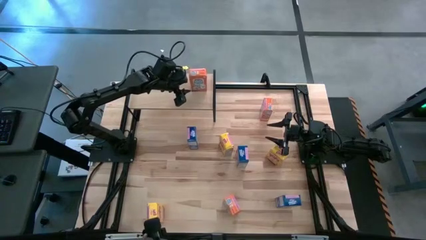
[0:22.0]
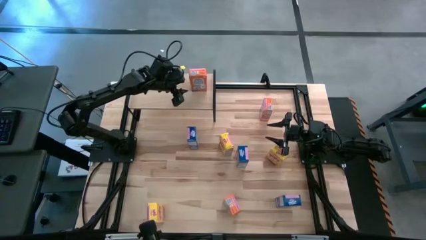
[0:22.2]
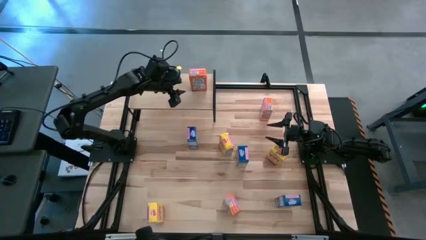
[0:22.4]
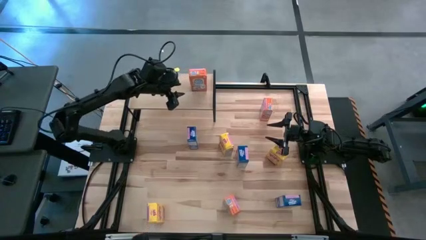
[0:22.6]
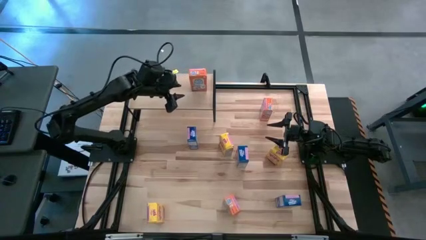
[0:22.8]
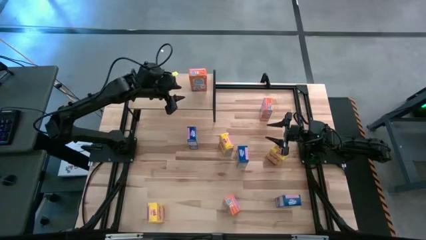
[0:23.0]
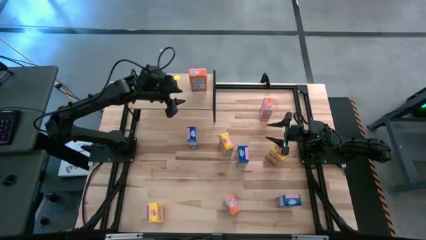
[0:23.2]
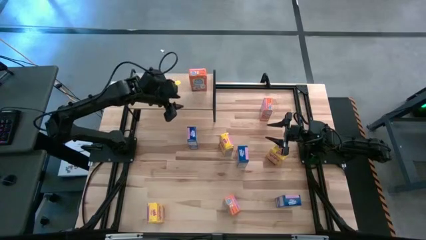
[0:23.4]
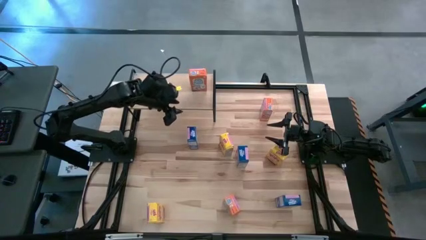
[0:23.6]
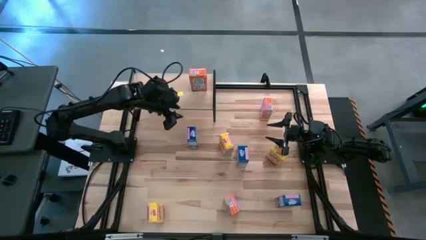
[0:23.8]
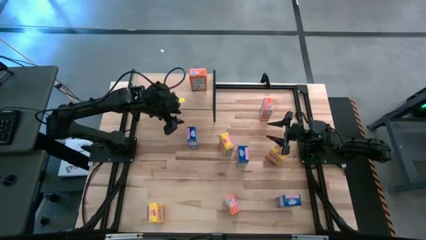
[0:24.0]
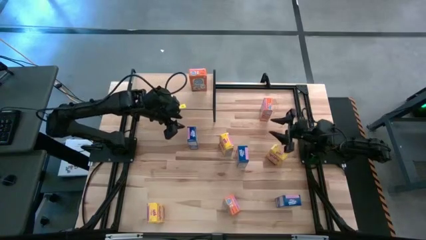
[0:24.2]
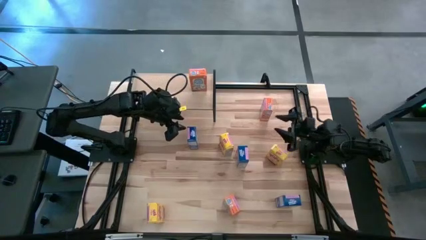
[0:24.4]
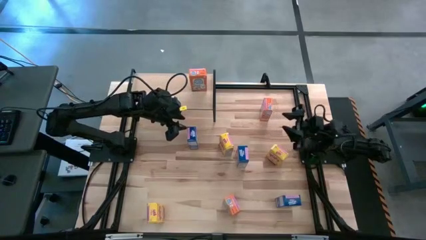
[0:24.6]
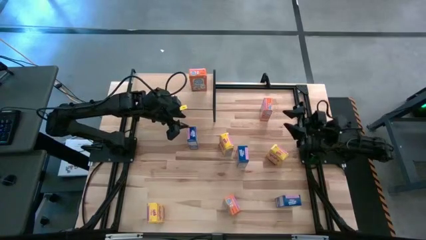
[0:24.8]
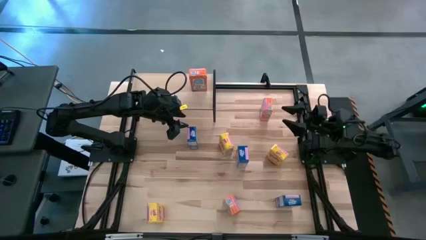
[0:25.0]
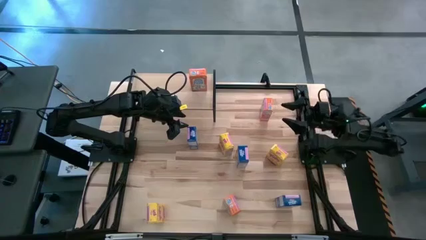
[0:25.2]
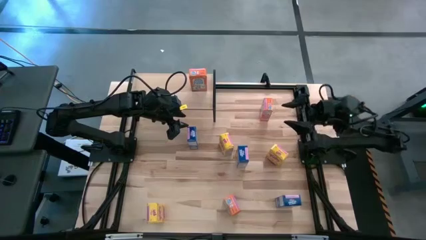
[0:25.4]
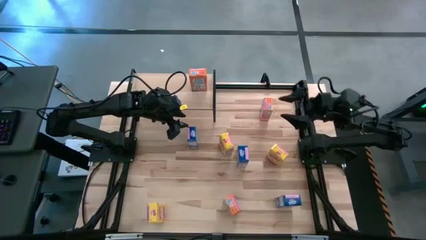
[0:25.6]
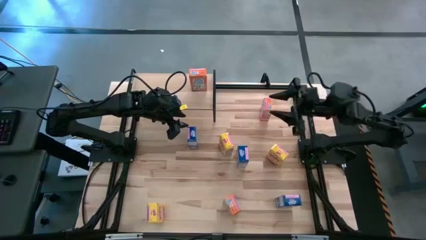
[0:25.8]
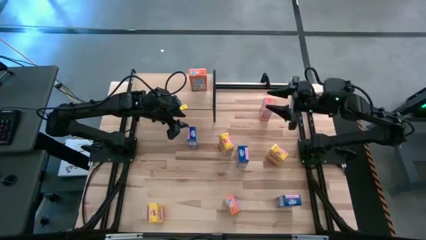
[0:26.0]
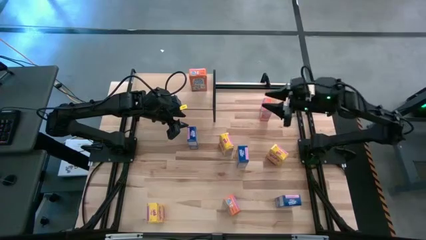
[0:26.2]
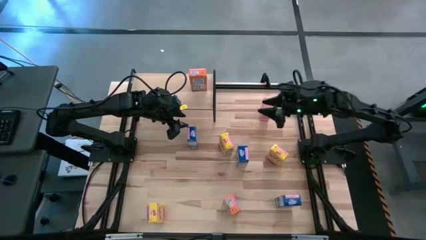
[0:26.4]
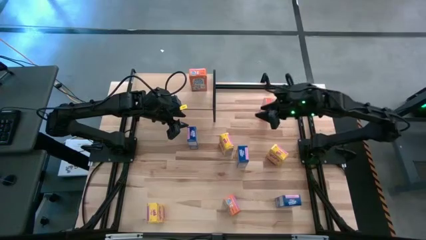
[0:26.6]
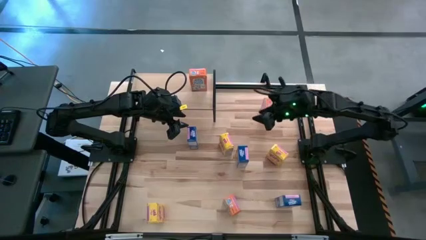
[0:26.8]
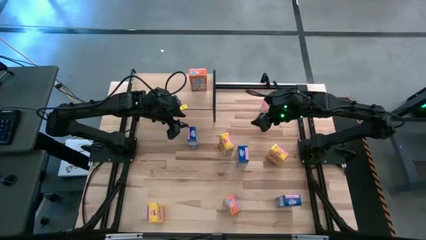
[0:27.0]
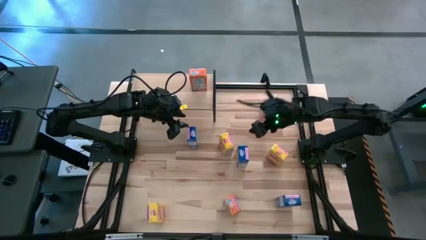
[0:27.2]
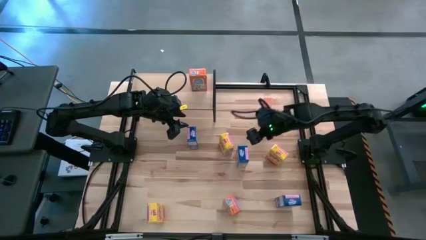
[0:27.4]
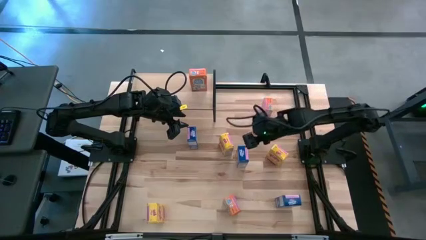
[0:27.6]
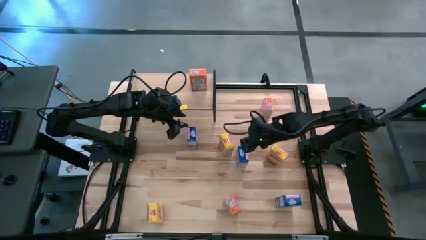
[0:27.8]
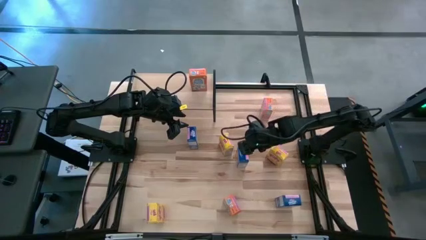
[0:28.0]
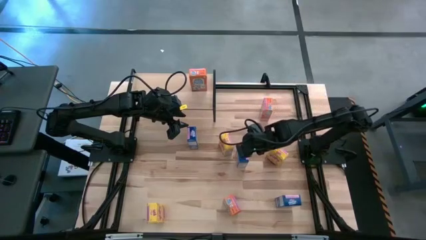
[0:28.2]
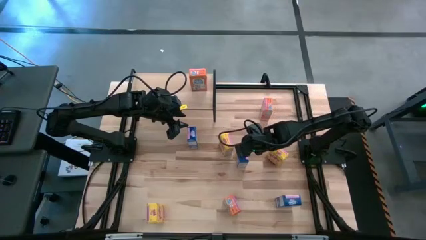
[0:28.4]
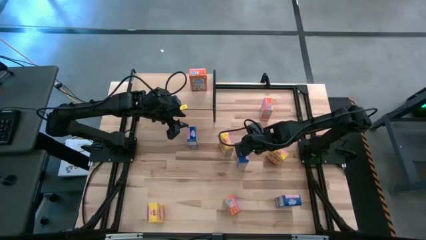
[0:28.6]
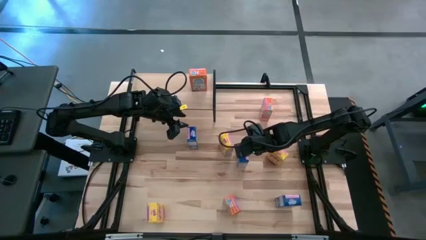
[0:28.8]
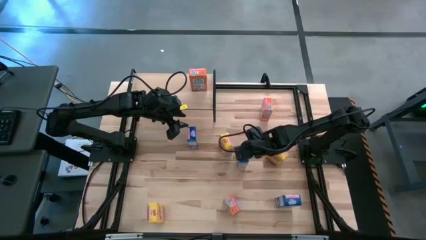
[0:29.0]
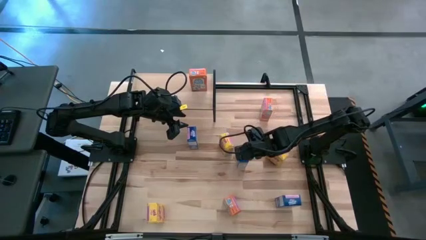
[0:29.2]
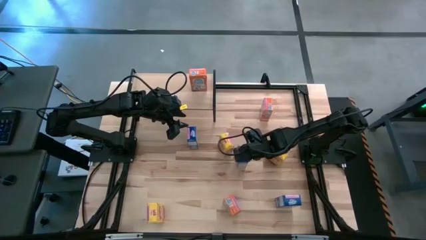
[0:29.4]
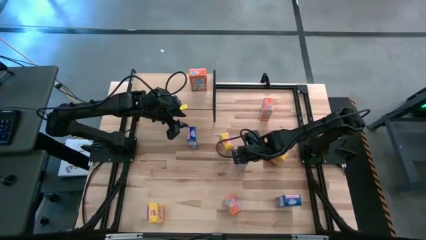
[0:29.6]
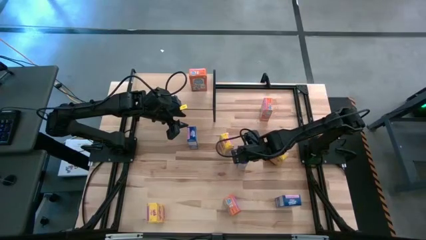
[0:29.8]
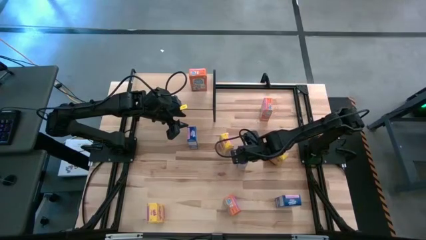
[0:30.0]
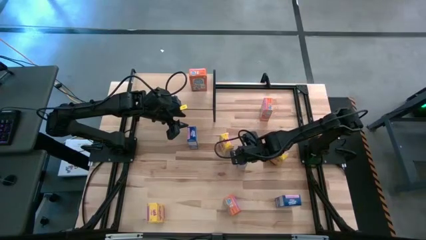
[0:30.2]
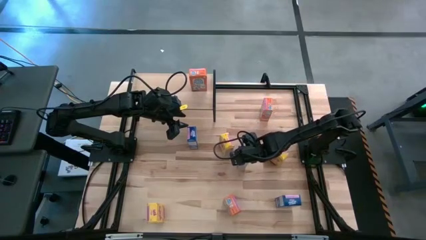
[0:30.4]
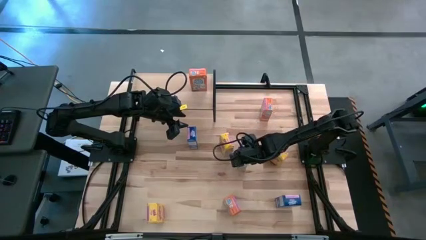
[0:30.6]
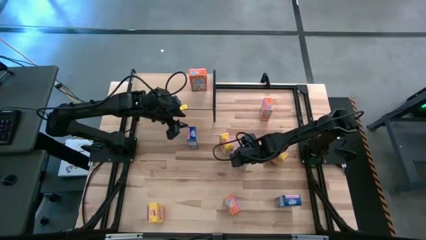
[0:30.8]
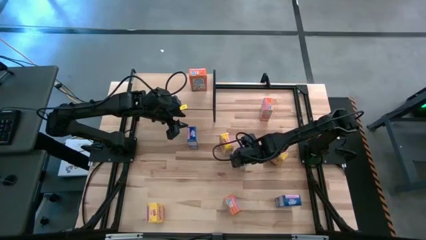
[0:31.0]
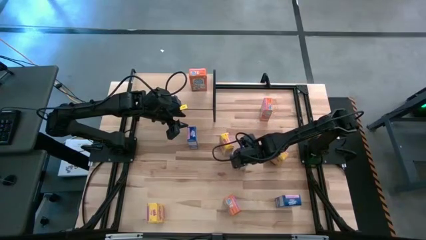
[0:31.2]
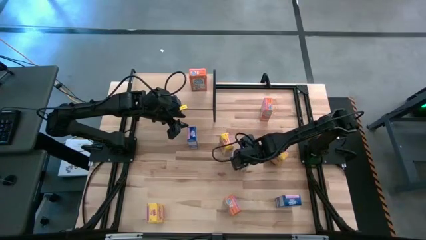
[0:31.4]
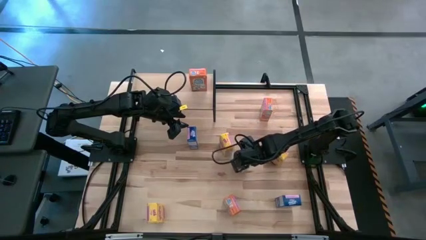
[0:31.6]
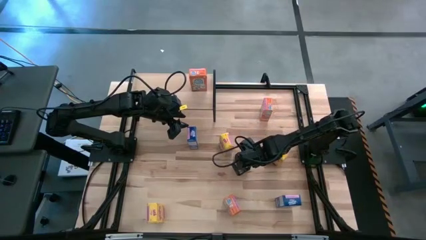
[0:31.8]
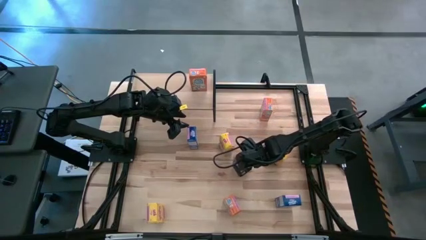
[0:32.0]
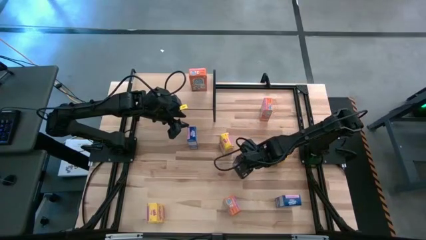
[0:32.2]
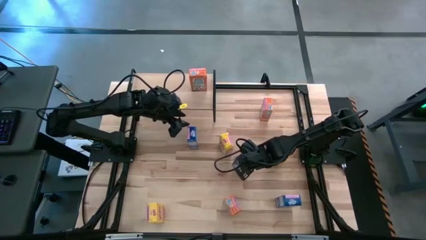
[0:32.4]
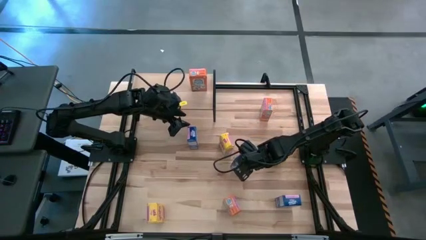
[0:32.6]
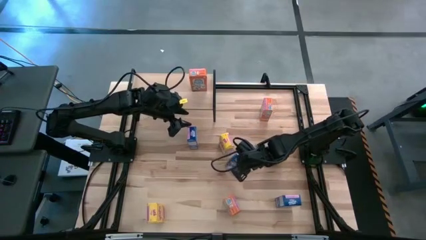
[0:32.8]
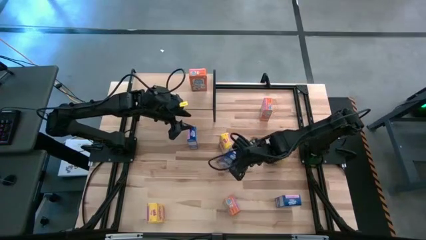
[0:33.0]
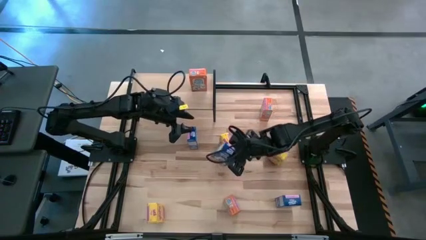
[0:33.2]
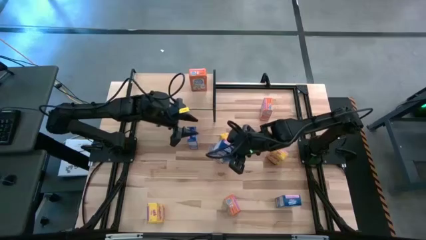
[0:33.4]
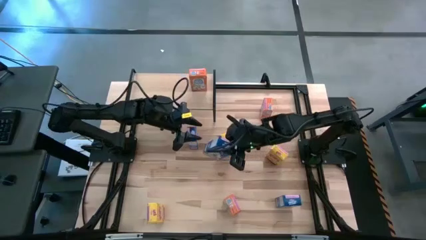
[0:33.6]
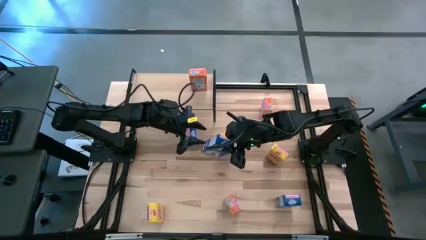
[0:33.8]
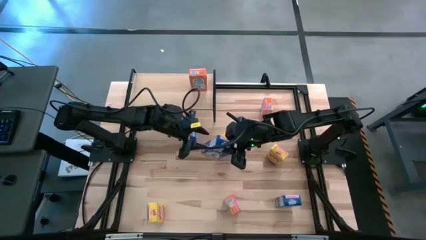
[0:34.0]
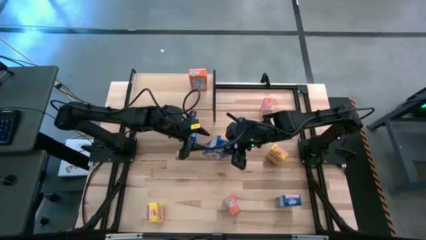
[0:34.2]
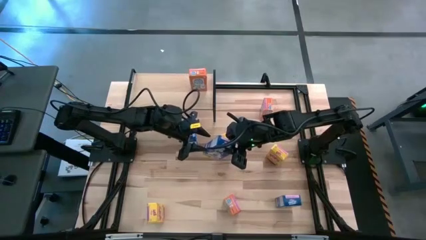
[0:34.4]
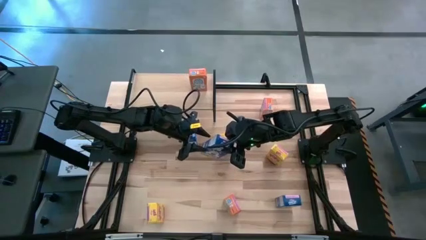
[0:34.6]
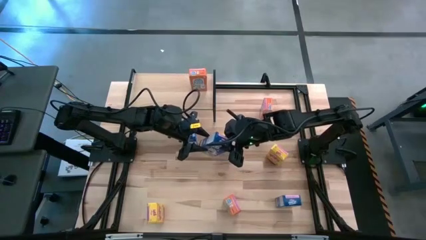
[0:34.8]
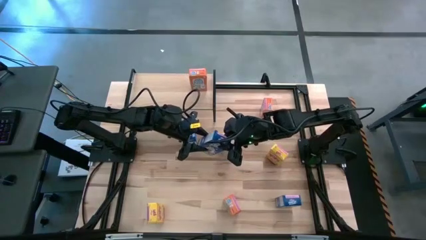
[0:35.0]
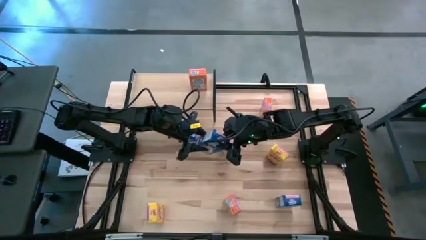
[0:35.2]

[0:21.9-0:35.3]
Task: Stack cereal on shelf
Put the middle blue cereal box on the shelf

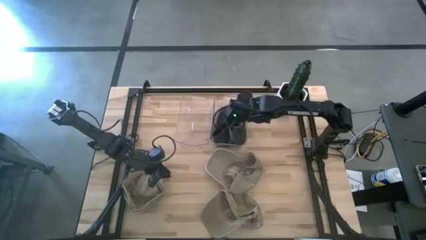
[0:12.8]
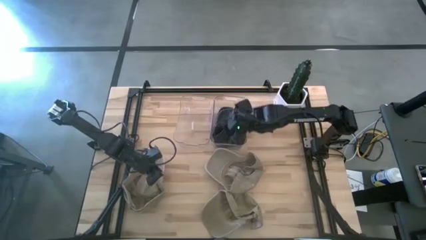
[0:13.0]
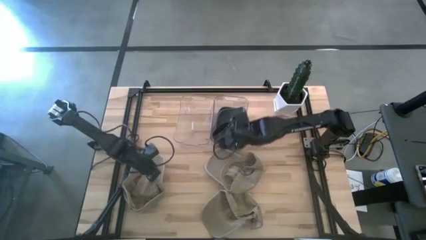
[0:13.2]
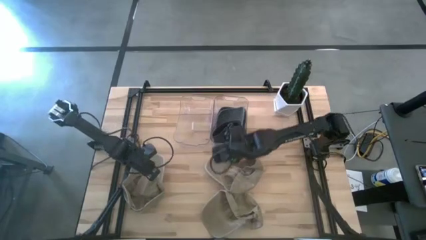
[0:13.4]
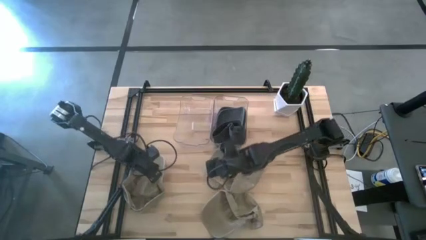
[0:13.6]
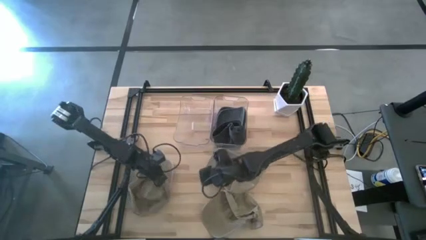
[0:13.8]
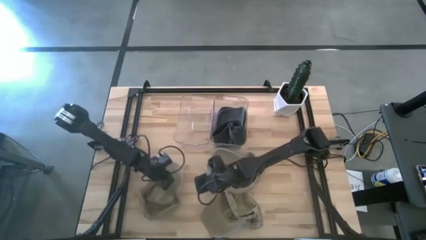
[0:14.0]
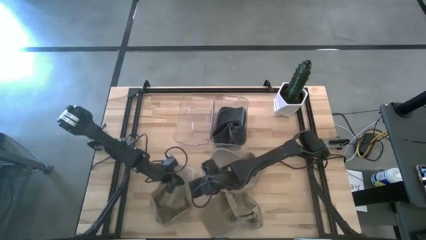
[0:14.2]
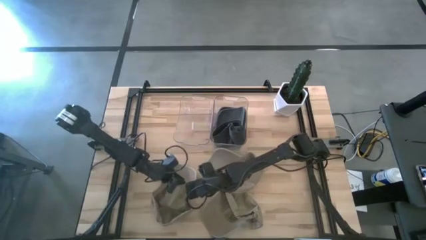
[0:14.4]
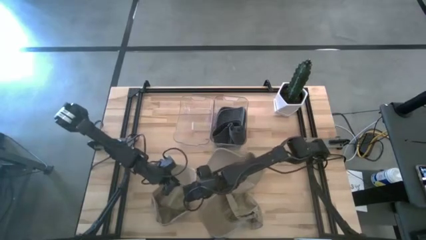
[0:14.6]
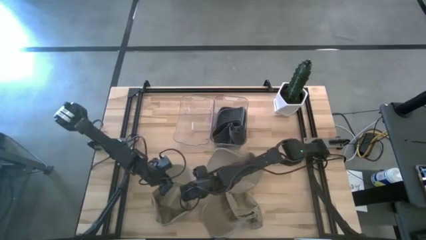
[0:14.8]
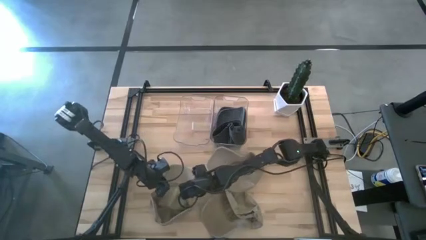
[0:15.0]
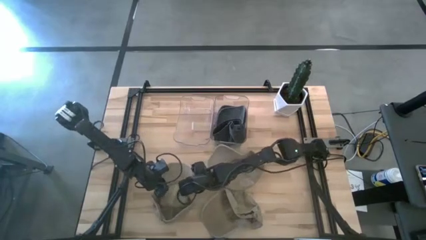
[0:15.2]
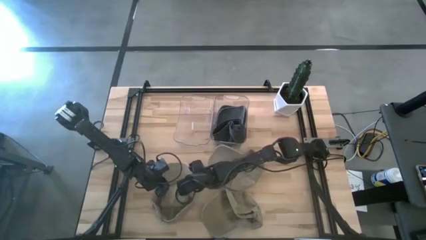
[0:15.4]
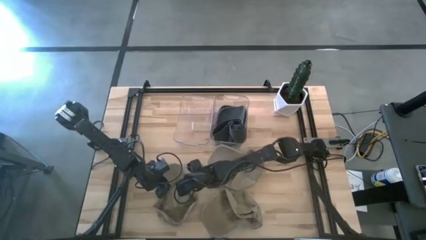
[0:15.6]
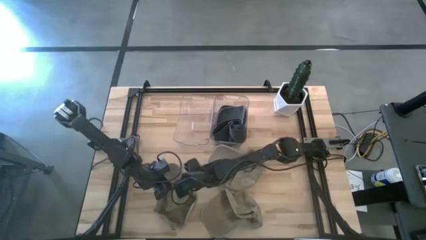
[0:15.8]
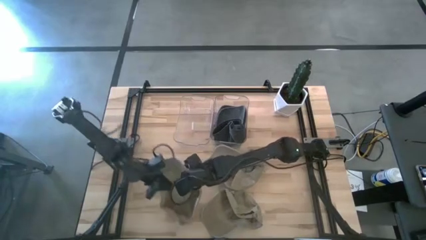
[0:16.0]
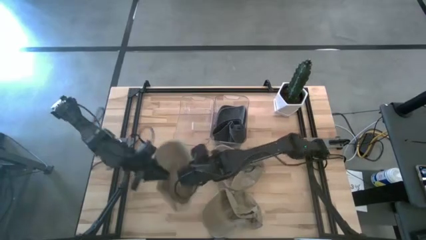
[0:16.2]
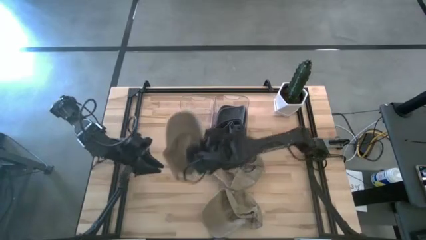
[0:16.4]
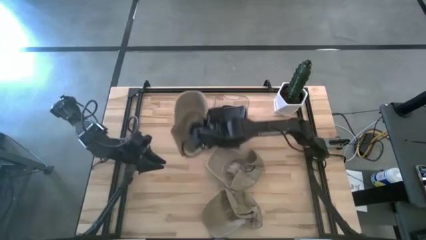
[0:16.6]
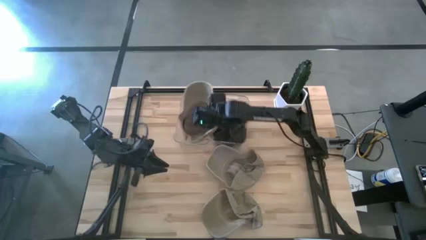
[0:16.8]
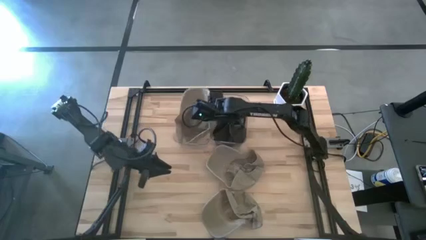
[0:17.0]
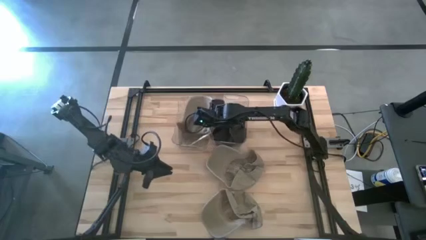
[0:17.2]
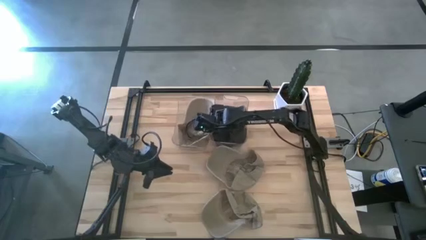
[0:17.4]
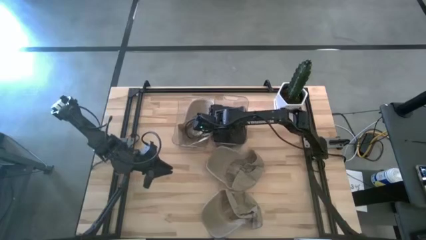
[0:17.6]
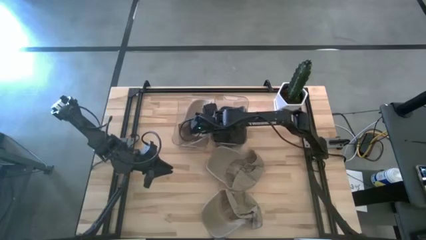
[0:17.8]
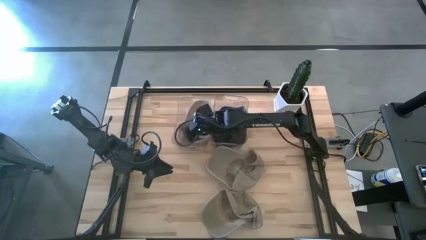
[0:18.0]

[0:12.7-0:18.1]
Task: Pick & Place hat
Put the top left brown cap into the left transparent bin
